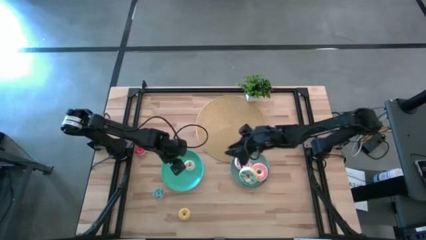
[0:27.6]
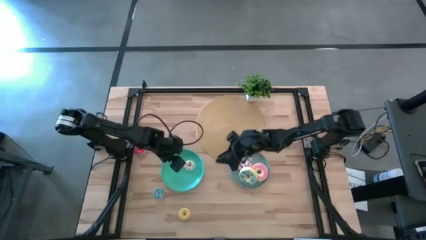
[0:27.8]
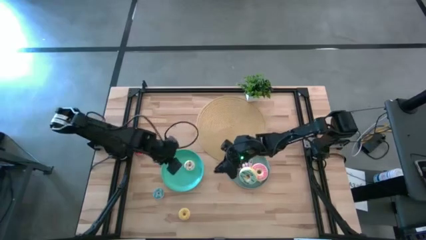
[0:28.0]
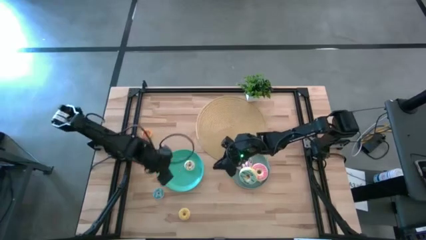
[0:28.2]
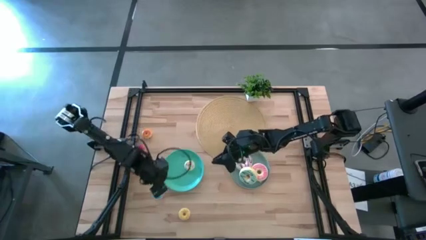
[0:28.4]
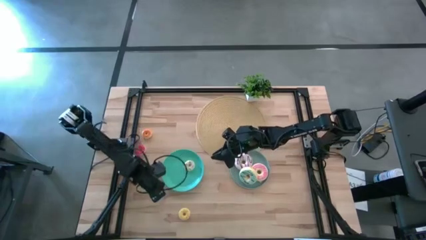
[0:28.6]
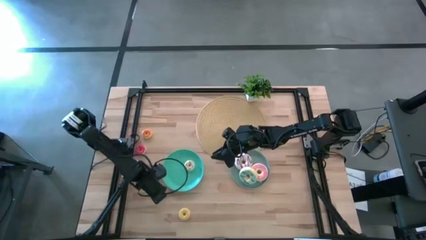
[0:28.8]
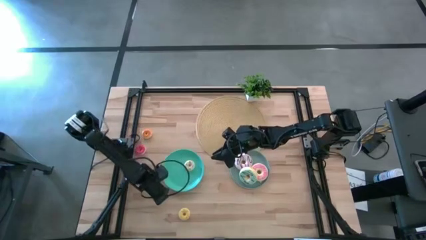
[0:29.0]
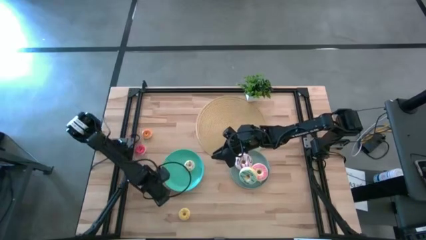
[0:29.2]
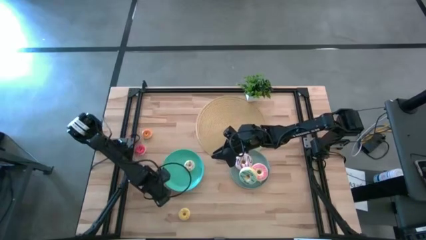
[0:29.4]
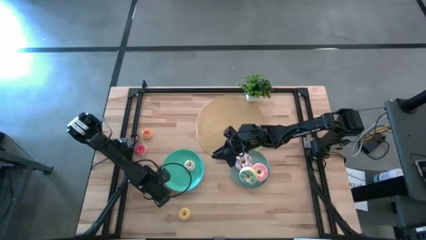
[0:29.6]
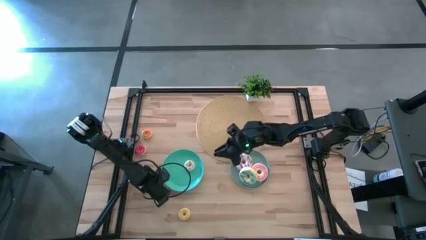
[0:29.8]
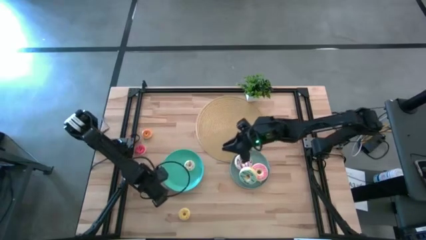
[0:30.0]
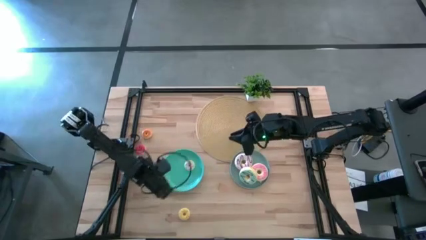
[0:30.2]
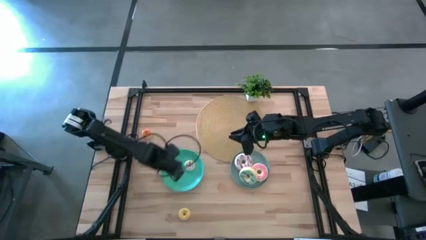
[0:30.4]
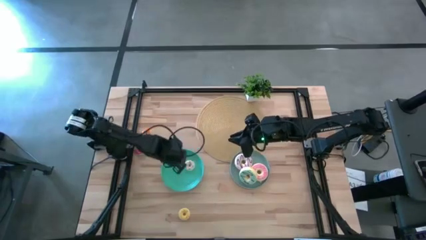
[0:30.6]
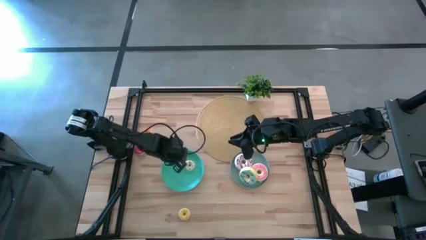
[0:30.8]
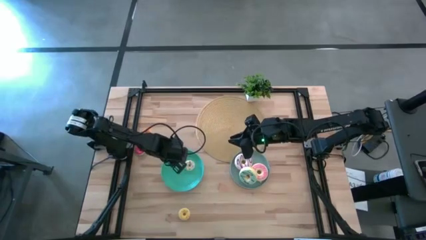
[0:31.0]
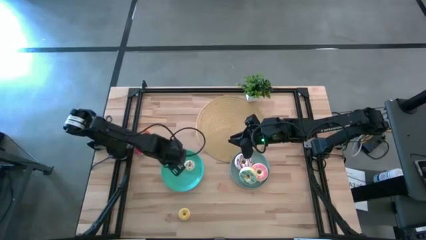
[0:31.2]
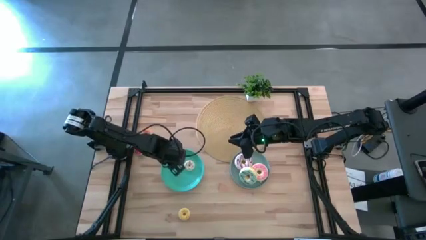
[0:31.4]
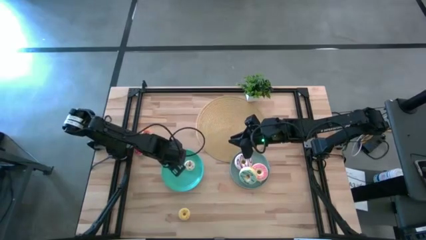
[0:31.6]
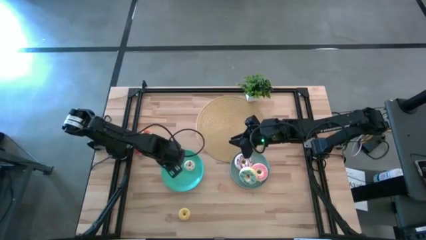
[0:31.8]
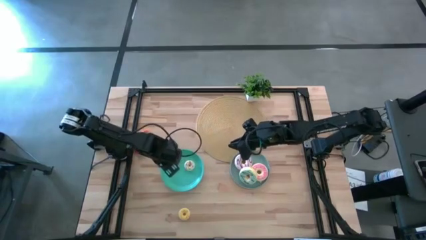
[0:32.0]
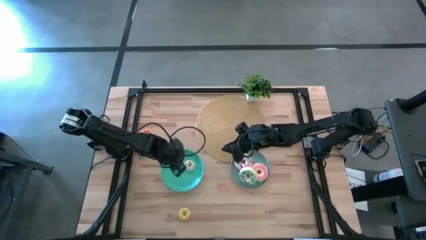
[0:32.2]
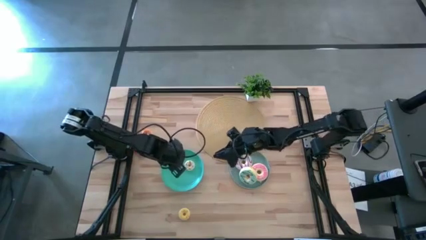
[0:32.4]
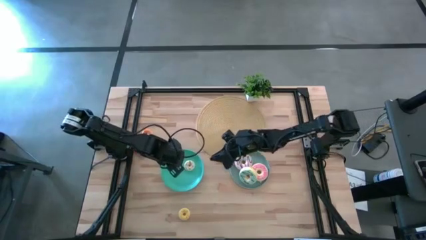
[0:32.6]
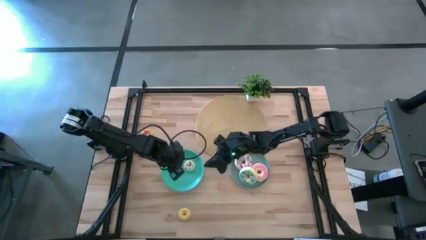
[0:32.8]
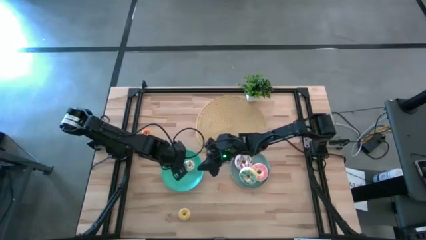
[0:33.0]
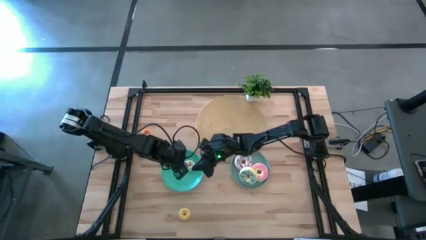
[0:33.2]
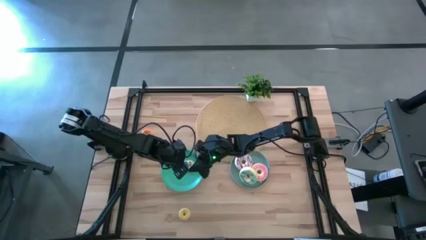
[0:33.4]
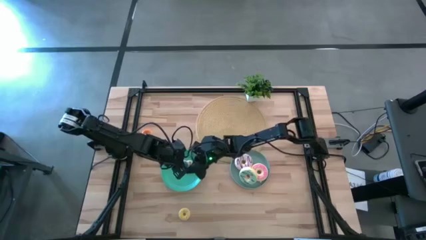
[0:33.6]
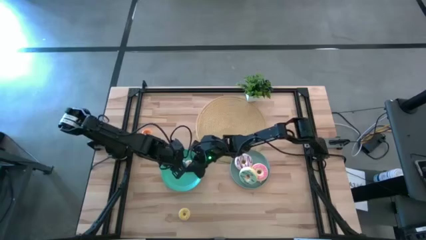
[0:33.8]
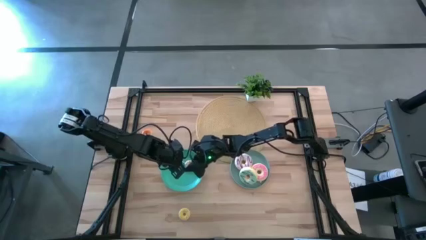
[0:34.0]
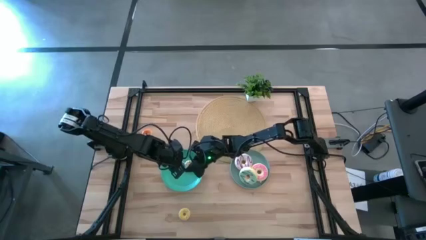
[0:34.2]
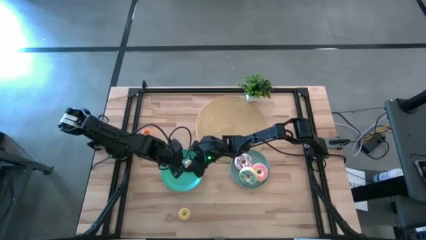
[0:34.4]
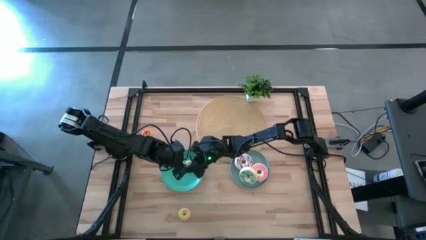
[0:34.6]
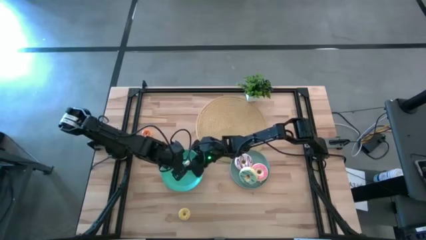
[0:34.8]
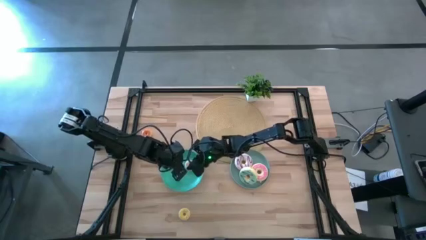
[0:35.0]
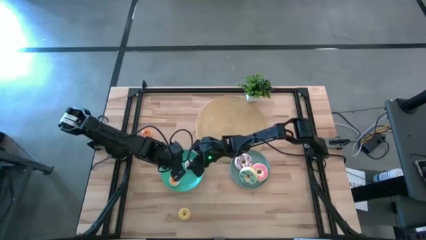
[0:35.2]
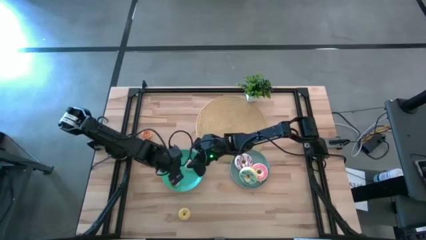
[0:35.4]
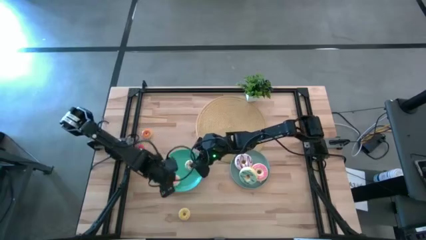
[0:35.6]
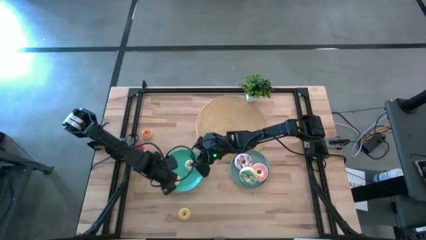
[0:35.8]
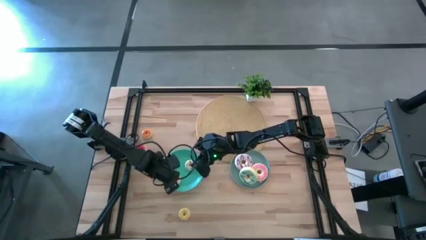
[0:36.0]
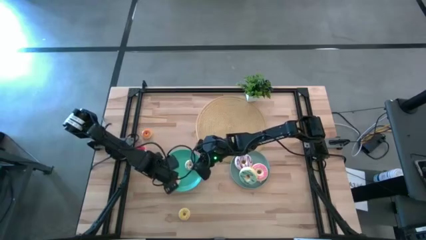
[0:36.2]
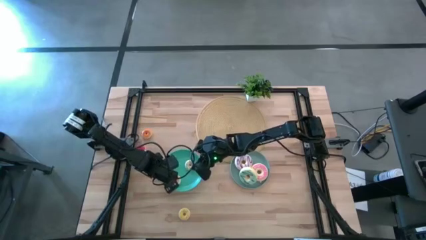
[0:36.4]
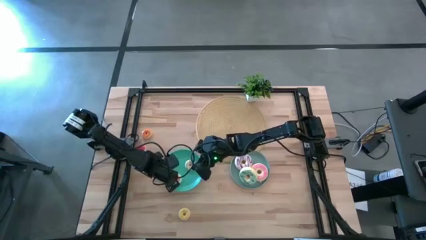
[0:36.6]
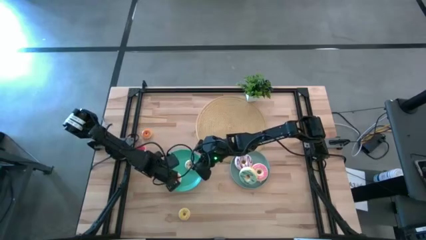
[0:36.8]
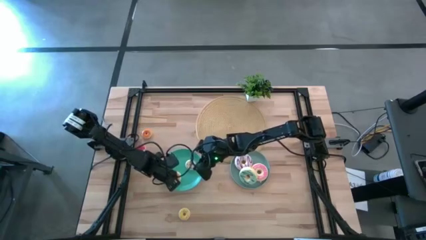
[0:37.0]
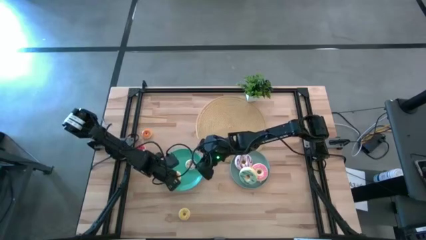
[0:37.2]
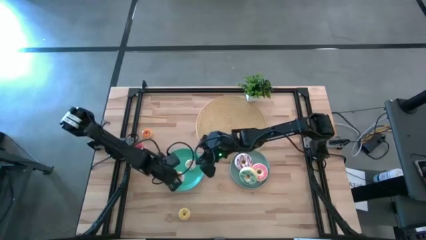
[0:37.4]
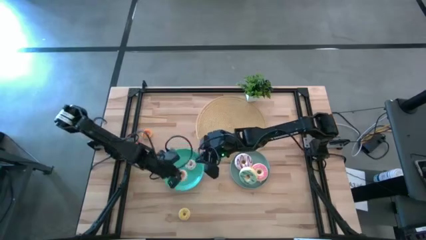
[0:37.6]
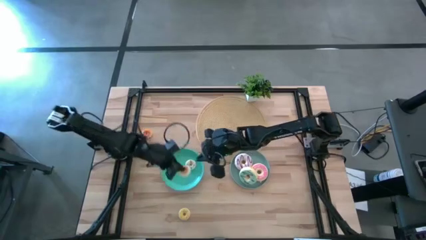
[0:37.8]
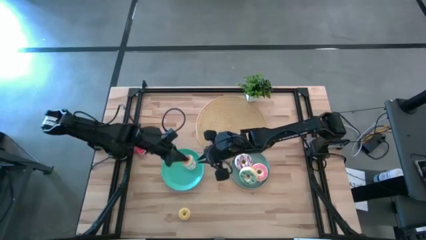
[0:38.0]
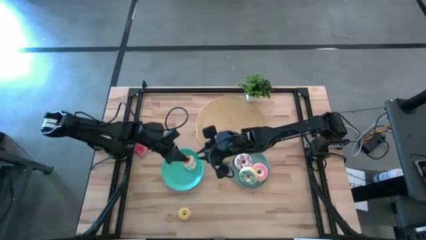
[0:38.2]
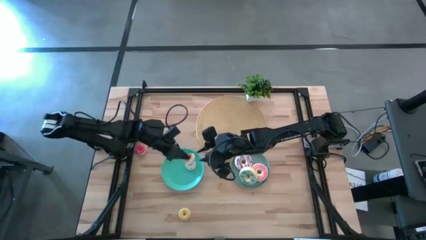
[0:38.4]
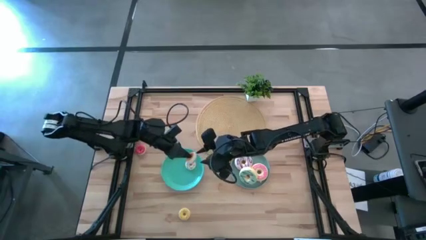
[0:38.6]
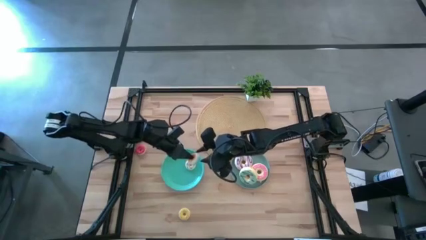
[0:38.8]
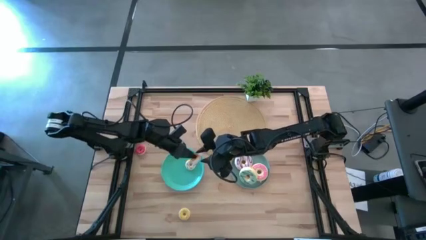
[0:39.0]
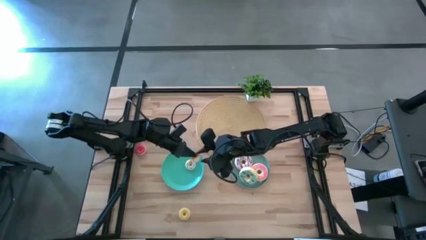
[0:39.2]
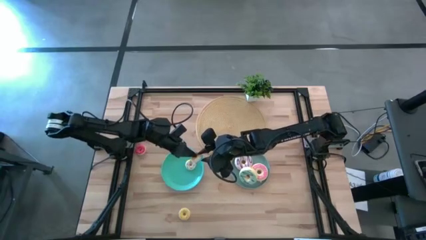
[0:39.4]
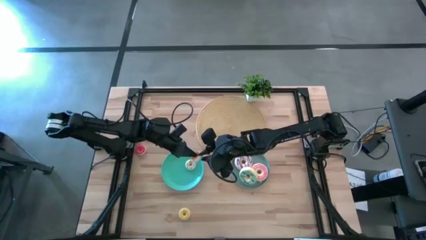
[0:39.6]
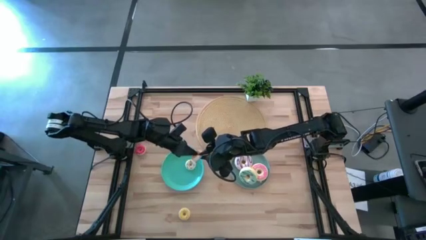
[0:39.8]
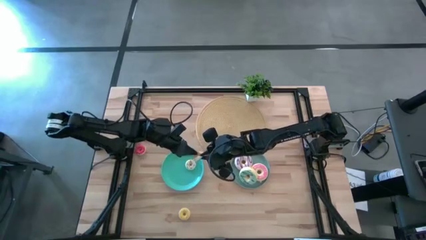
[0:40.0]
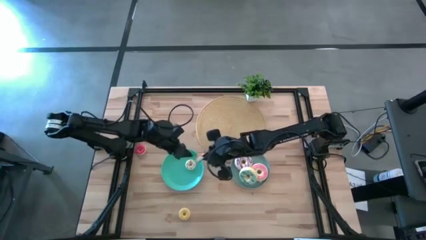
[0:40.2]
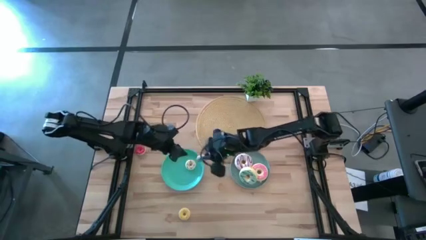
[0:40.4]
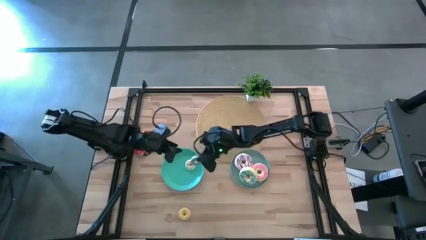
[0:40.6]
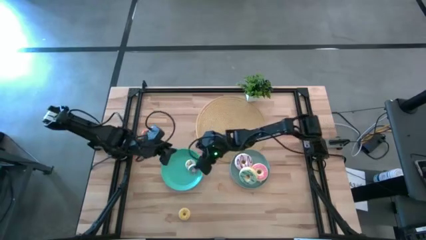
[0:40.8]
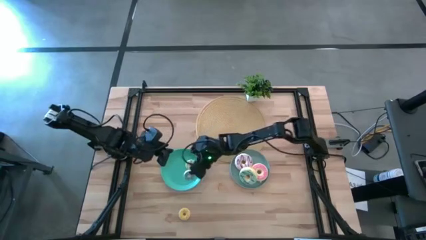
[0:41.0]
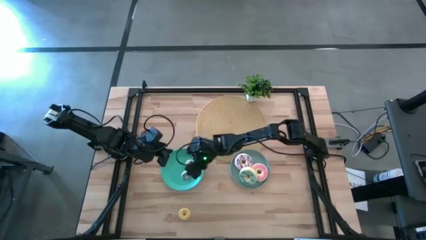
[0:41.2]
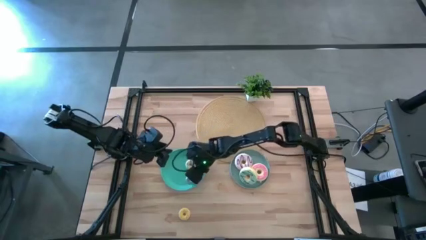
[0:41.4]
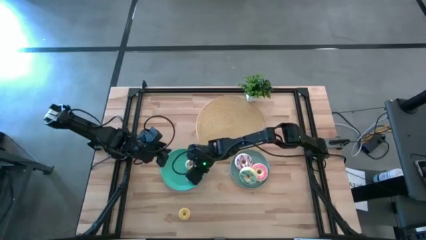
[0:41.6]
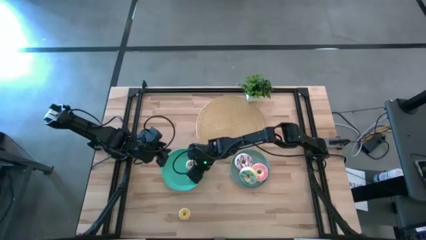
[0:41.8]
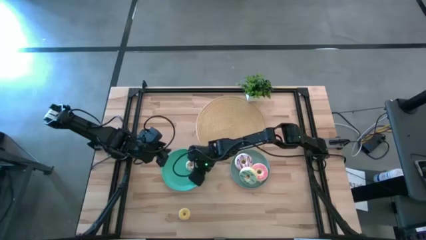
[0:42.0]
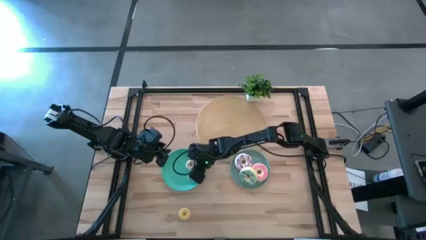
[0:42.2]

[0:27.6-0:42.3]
Task: Pick & Place donuts
Put the small blue donut on the blue plate
